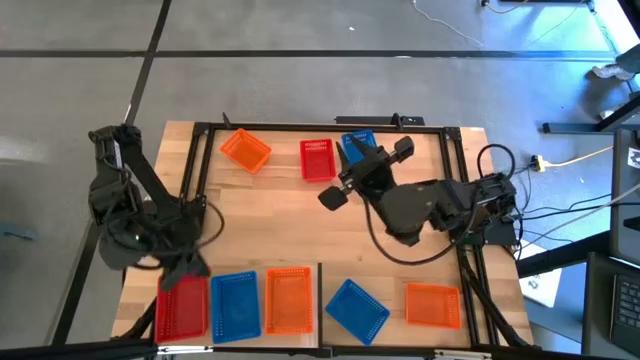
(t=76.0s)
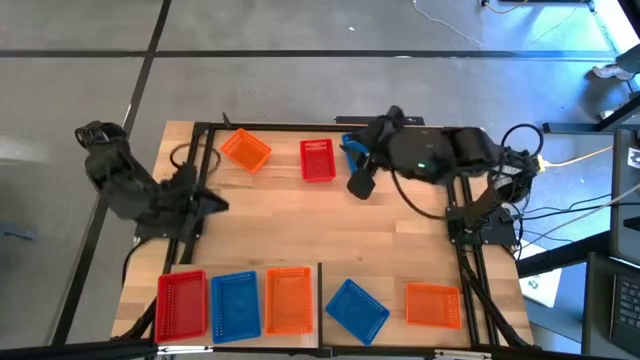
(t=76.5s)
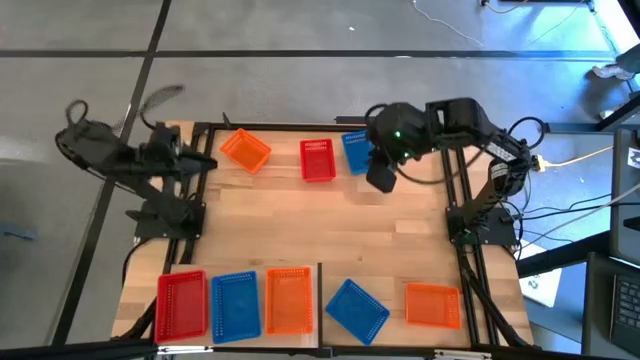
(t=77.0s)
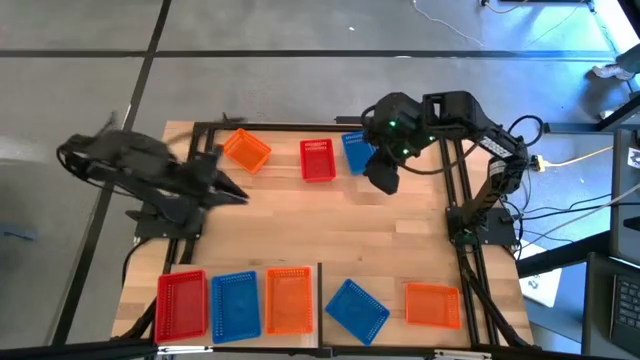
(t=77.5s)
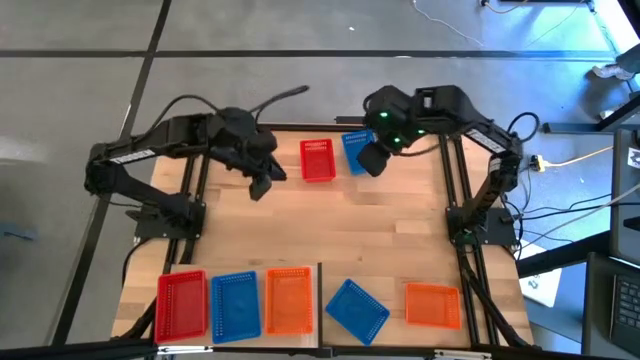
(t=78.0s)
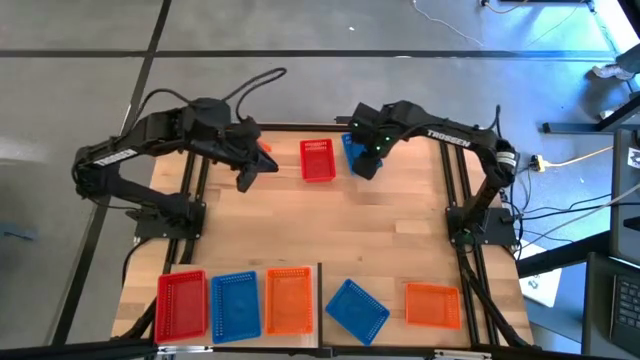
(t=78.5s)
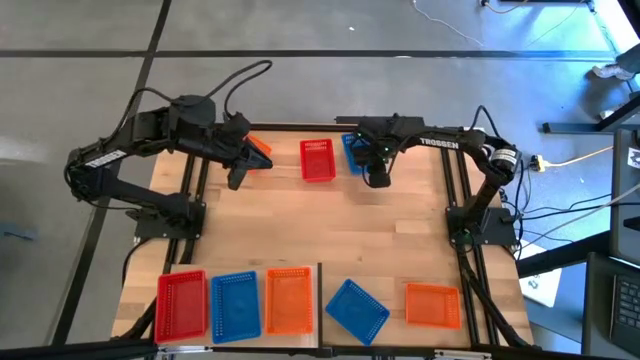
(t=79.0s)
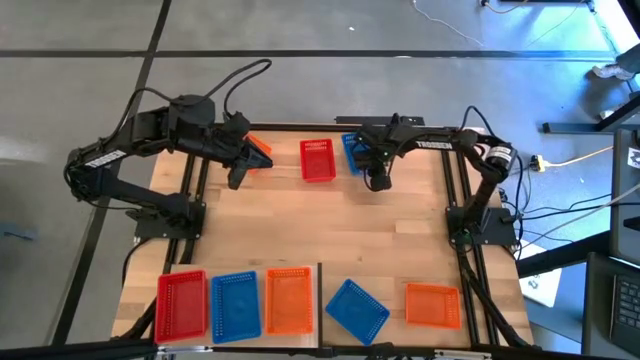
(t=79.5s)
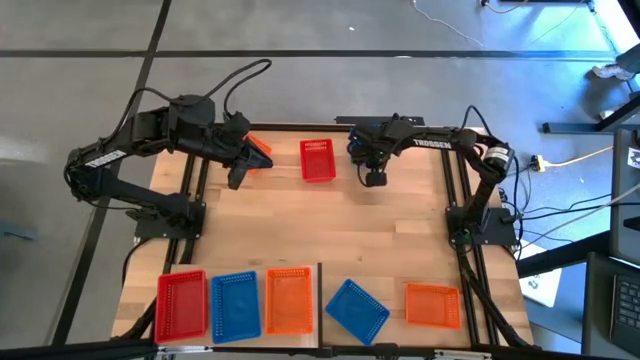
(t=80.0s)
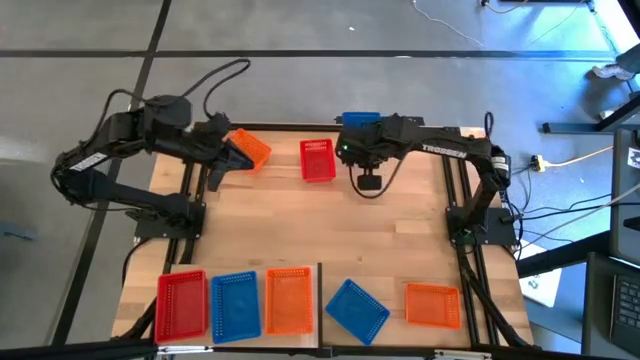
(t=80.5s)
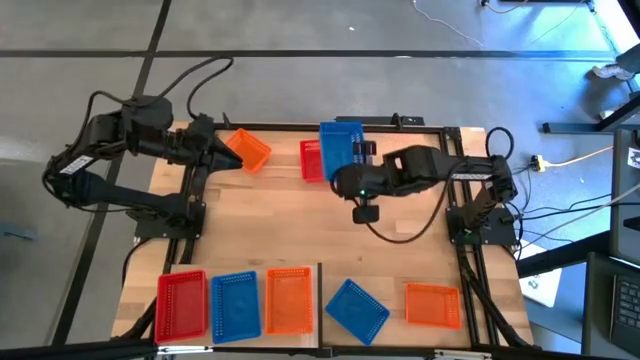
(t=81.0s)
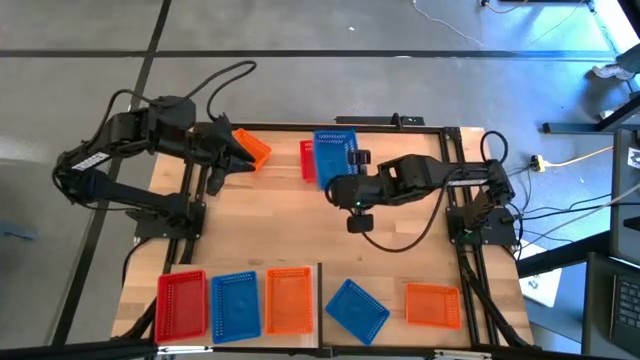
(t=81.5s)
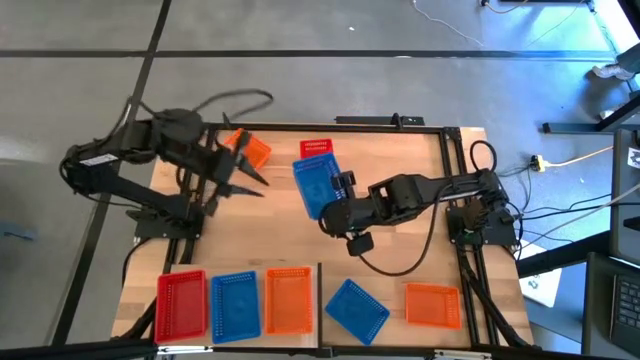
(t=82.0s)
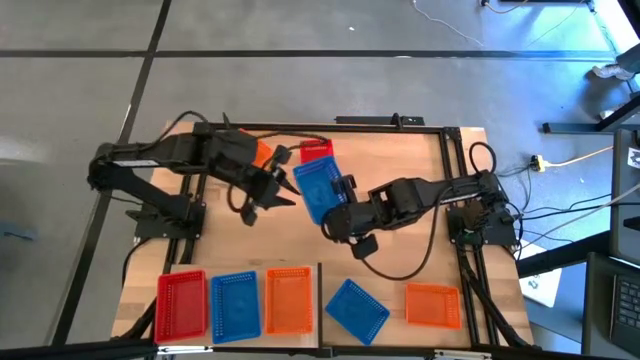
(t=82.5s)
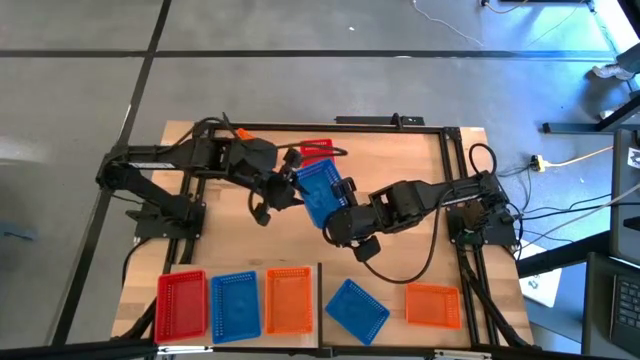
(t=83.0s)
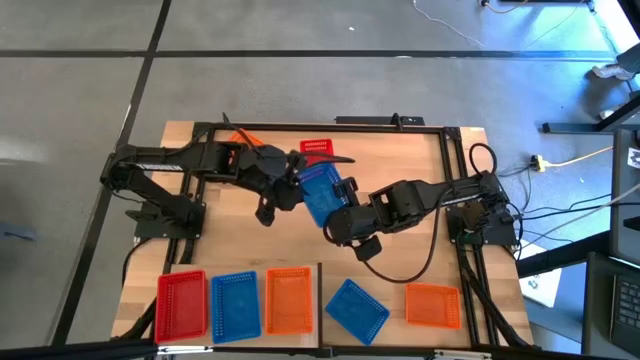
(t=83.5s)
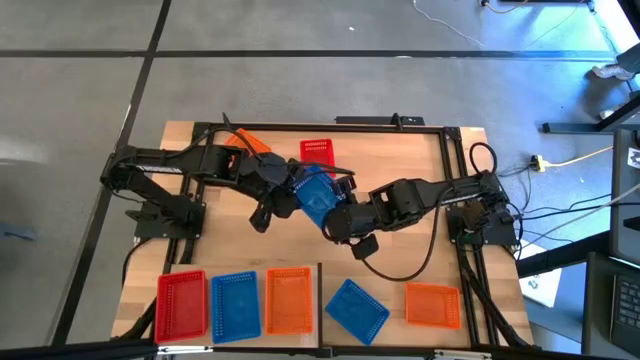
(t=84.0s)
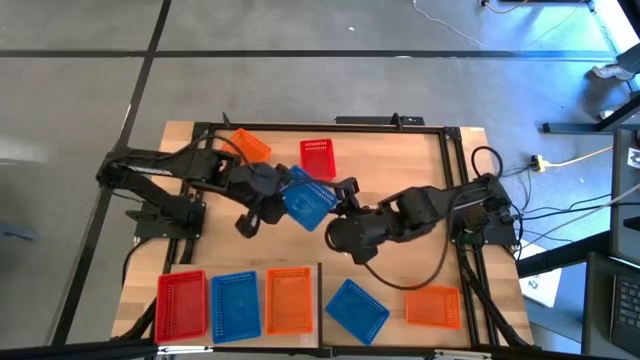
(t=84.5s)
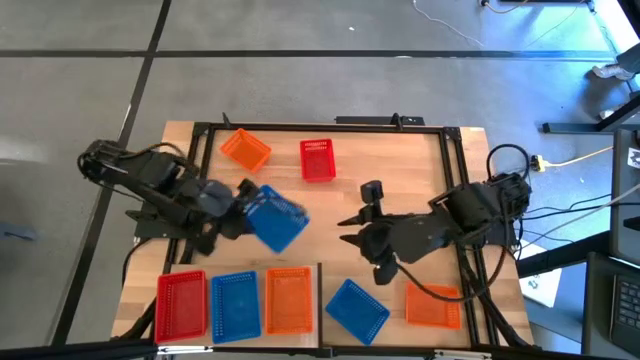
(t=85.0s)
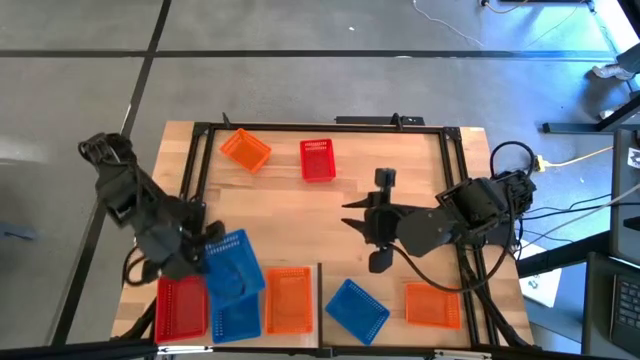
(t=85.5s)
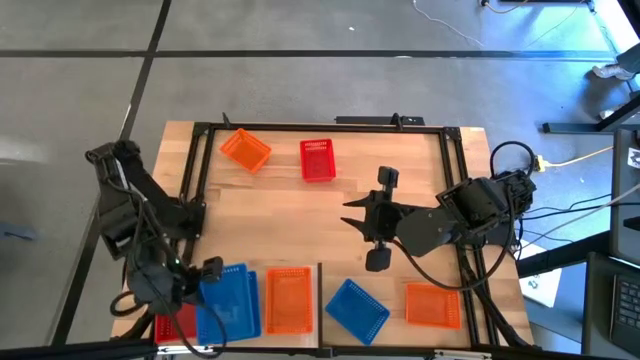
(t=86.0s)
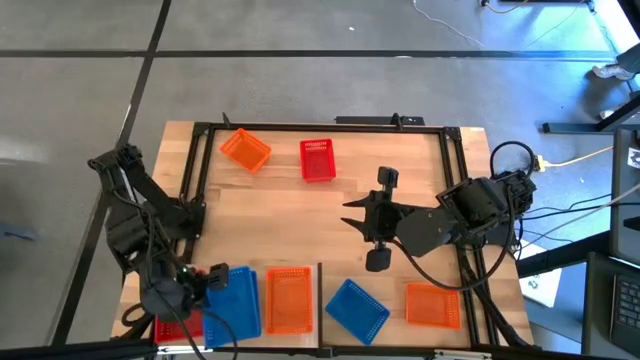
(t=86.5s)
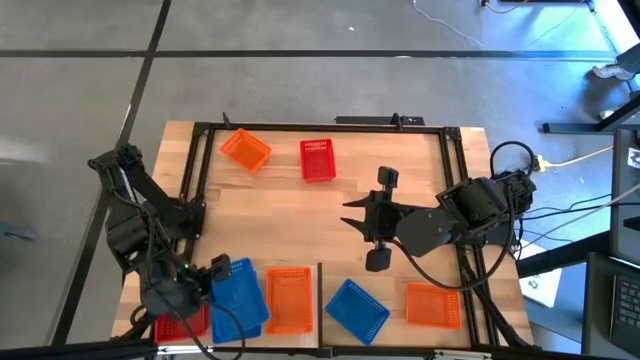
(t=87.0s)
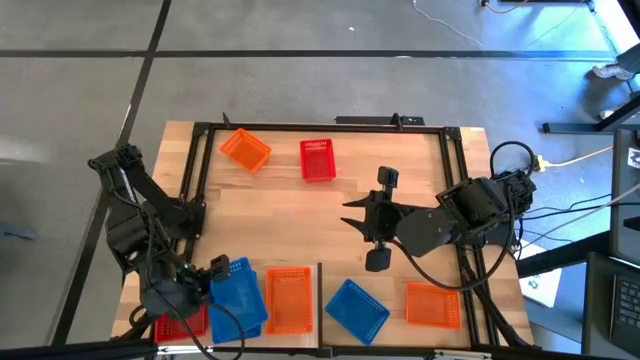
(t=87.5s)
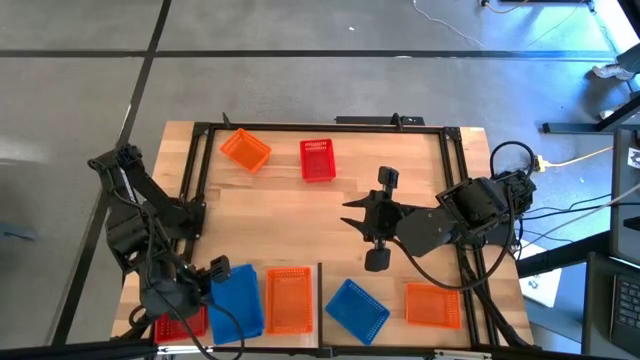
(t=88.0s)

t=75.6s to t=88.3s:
Task: Stack baskets on shelf by color
Stack the top blue bin on top of the other blue bin on the shelf

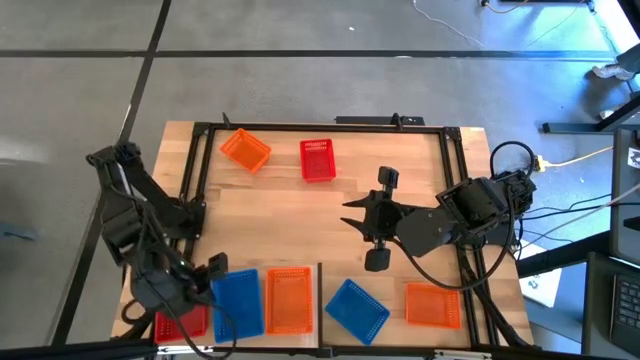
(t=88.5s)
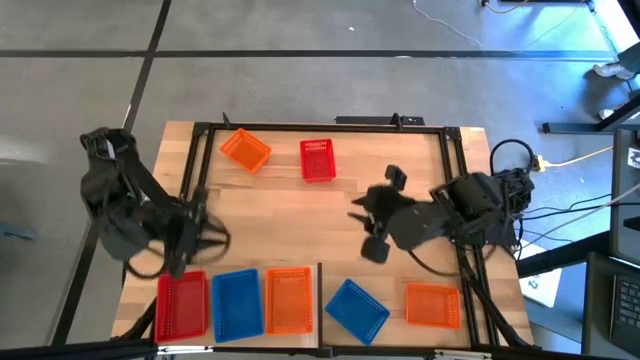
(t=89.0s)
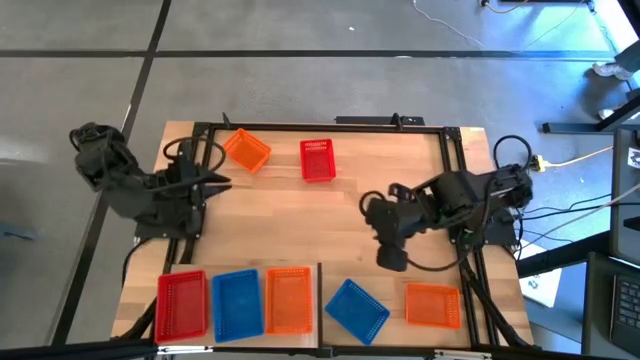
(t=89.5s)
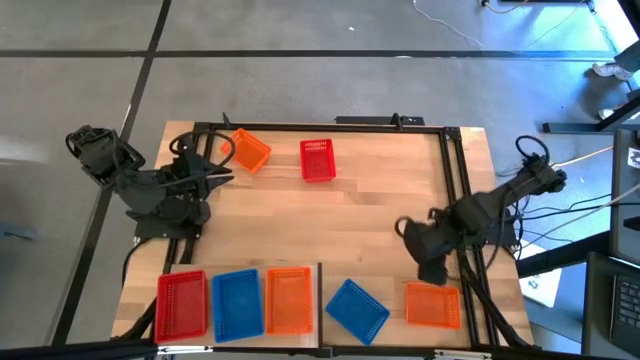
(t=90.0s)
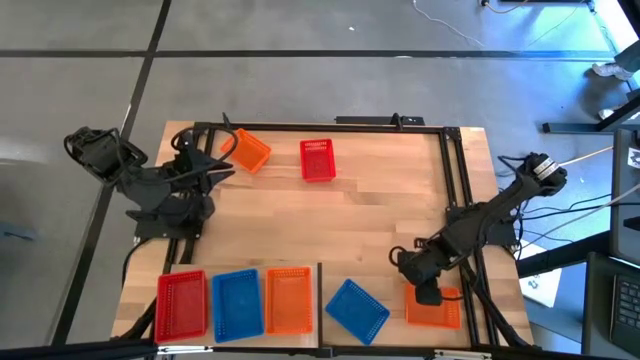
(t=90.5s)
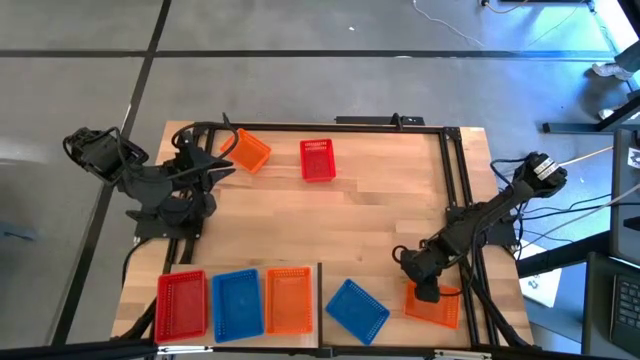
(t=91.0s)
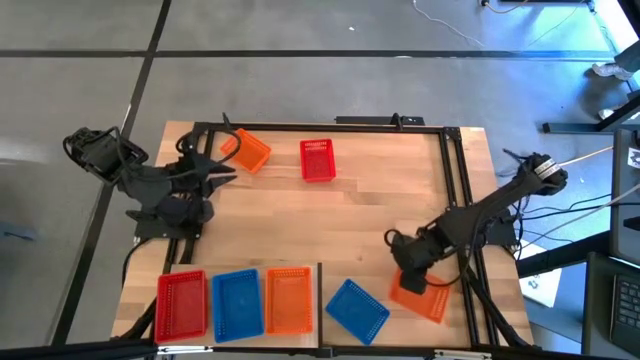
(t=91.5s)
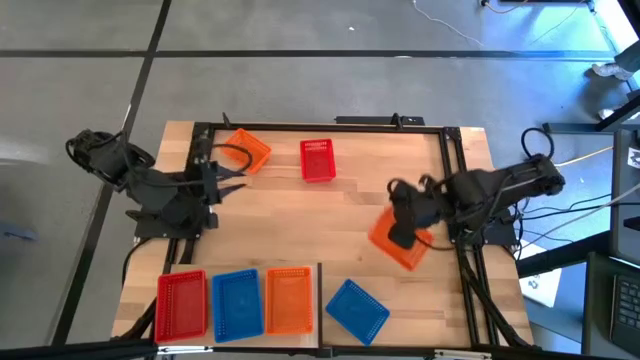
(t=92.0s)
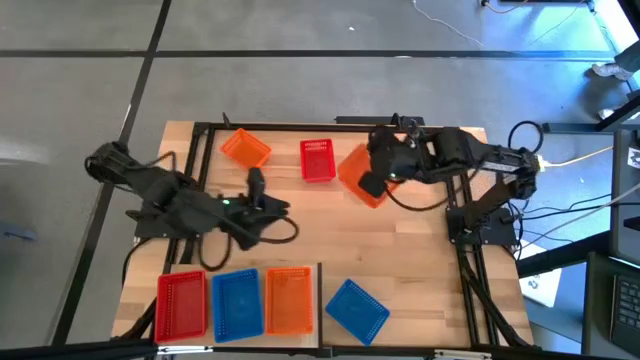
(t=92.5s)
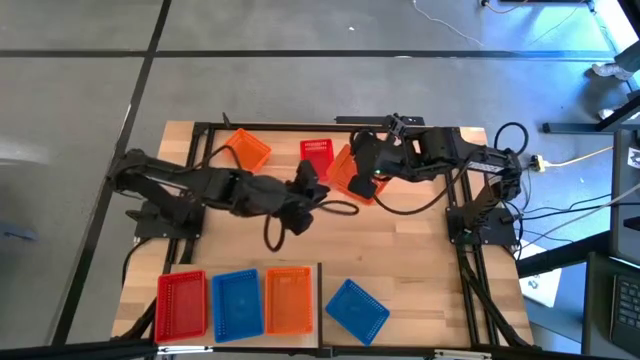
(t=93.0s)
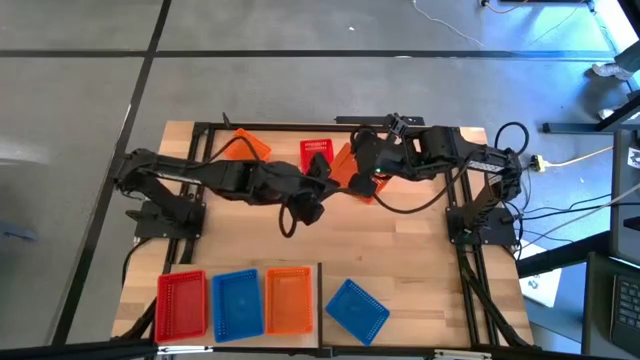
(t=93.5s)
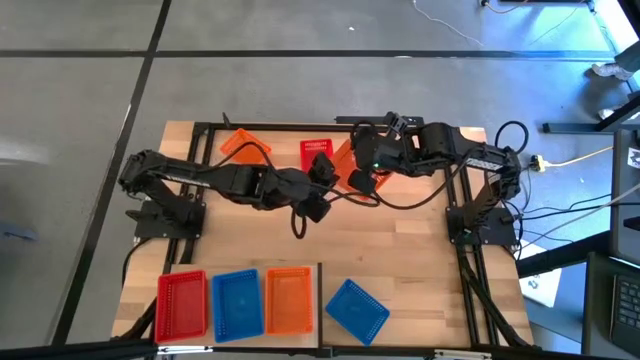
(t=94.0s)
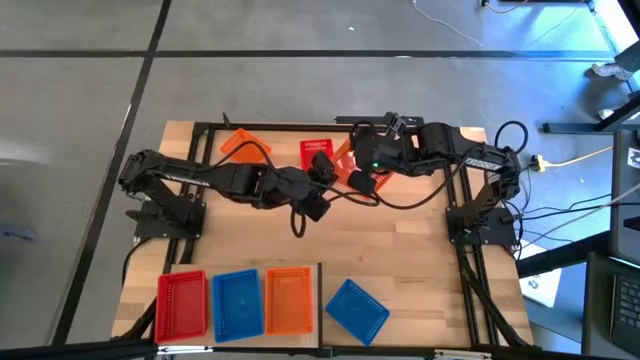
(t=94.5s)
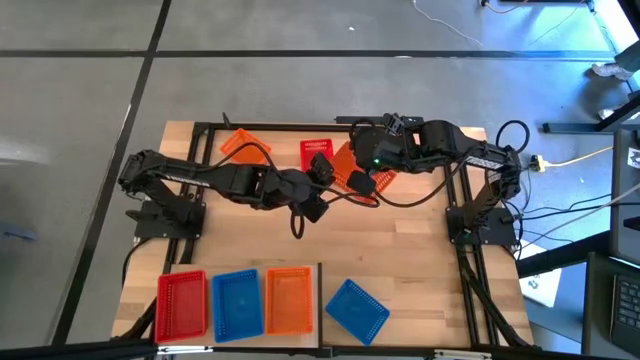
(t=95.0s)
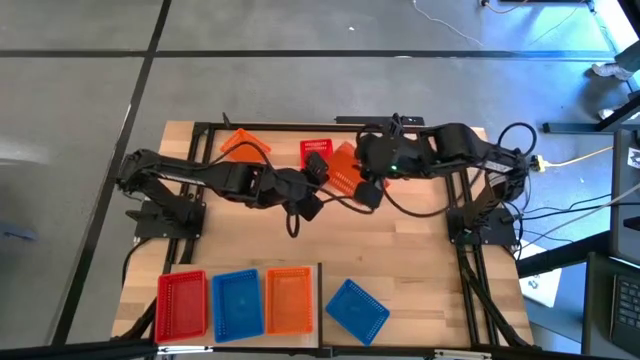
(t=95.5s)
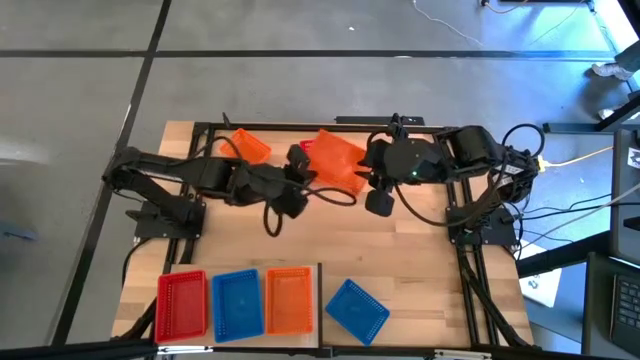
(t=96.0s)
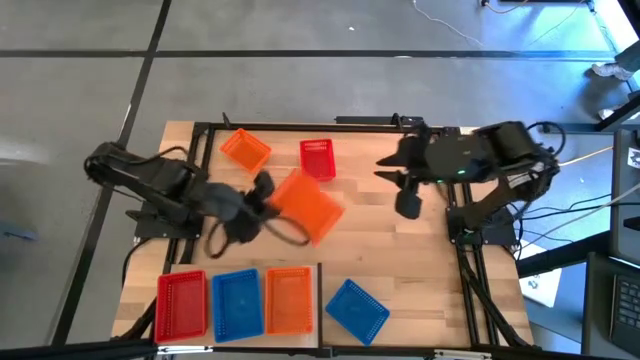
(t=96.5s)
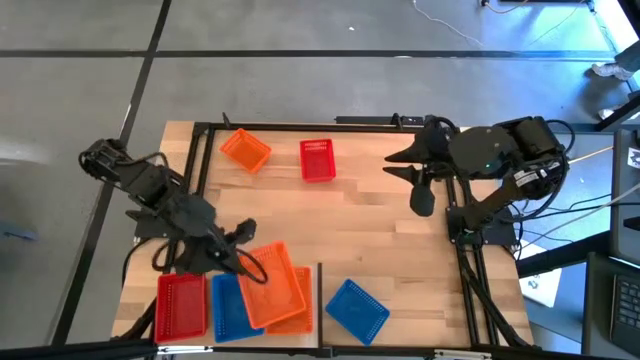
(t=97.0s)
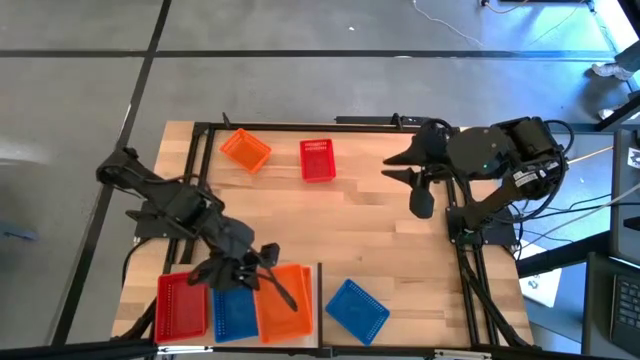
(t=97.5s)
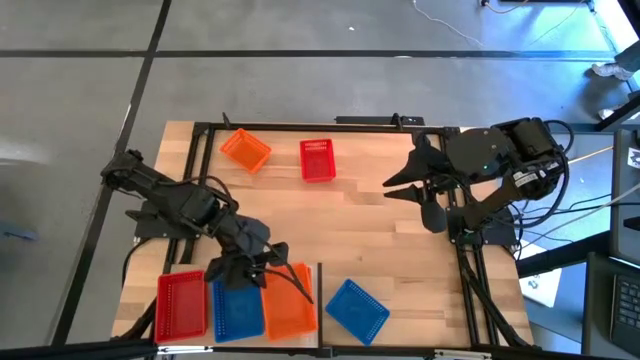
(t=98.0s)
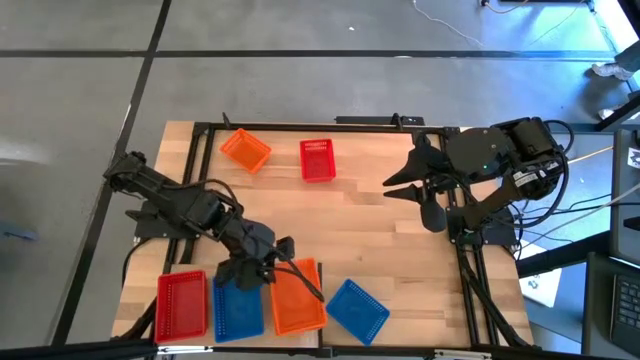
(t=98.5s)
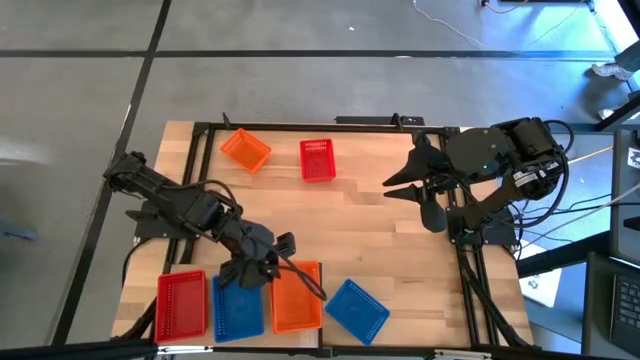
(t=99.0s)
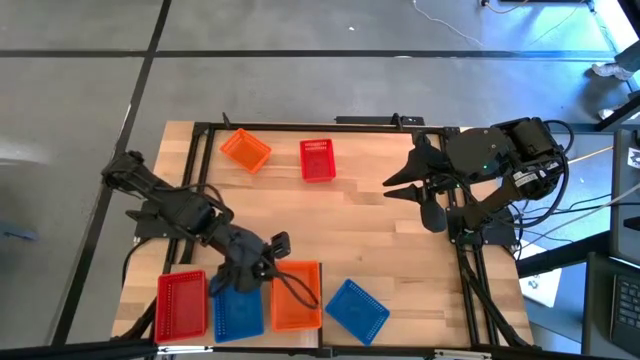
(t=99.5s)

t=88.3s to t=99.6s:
Stack the bottom orange bin on top of the other orange bin on the shelf
